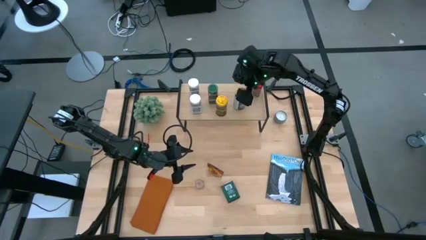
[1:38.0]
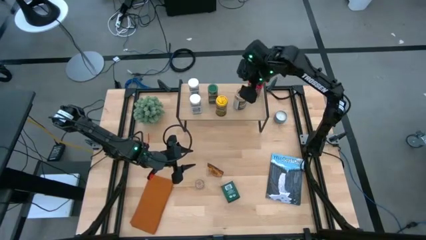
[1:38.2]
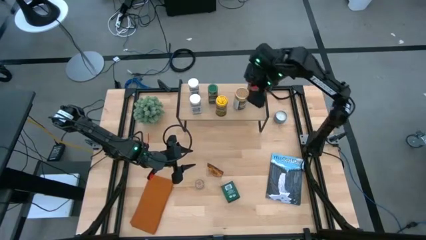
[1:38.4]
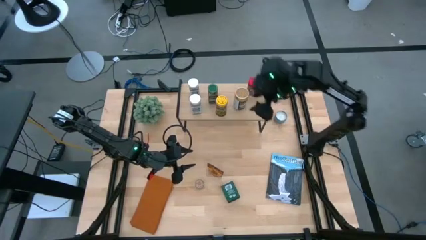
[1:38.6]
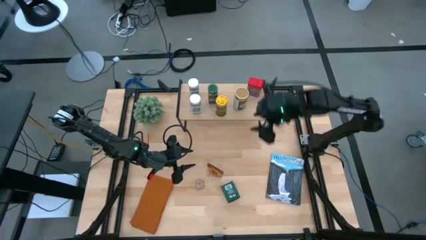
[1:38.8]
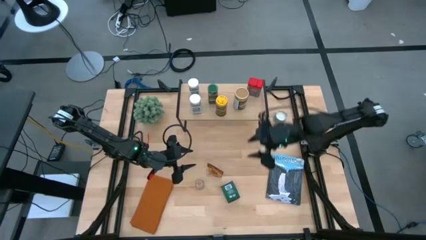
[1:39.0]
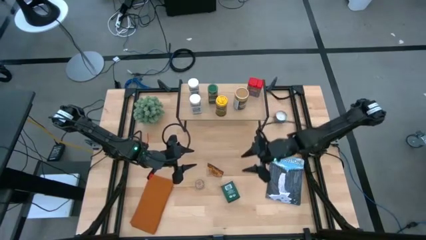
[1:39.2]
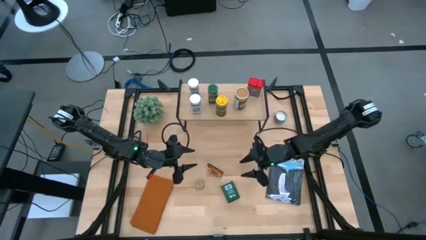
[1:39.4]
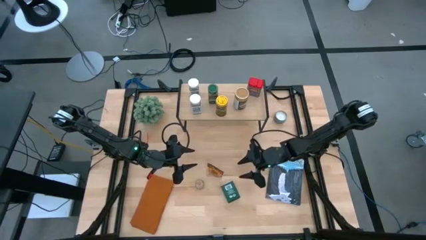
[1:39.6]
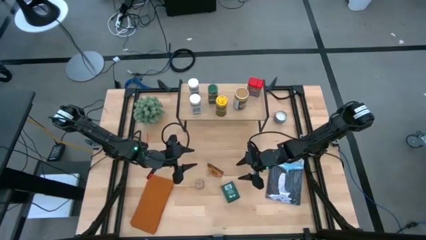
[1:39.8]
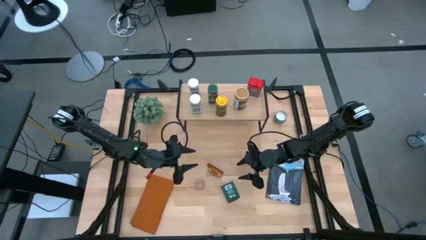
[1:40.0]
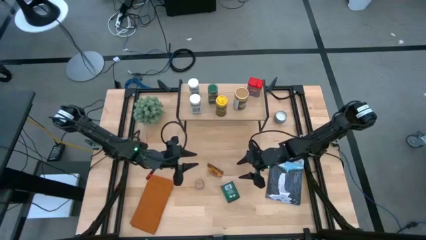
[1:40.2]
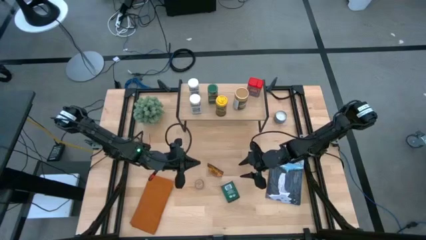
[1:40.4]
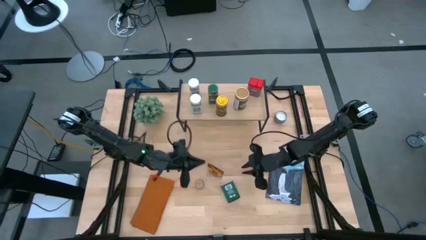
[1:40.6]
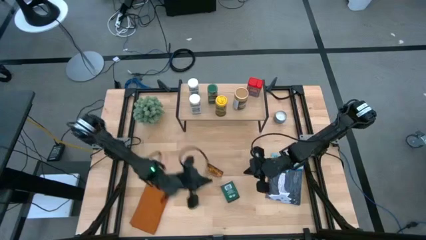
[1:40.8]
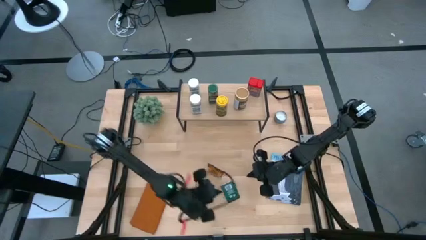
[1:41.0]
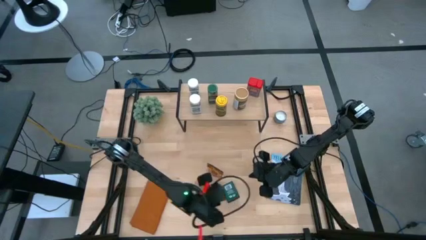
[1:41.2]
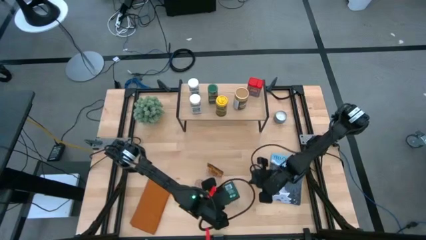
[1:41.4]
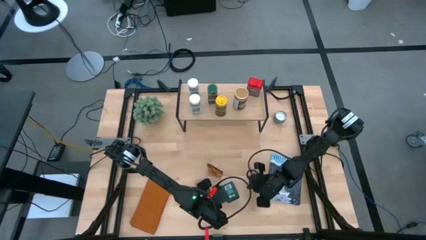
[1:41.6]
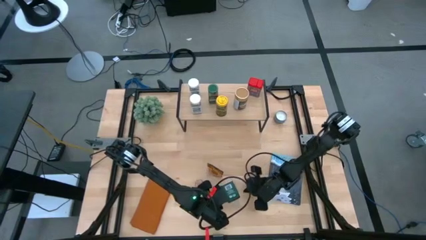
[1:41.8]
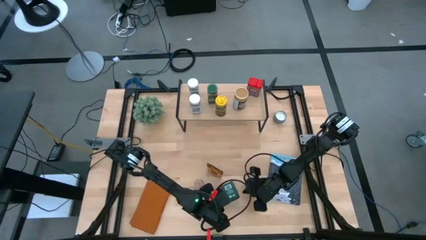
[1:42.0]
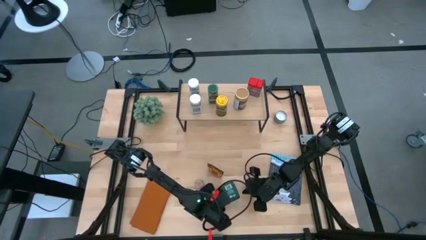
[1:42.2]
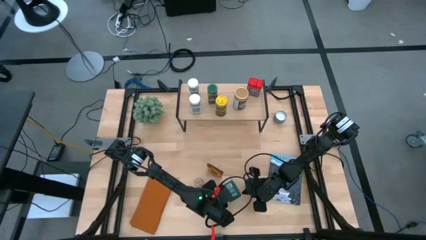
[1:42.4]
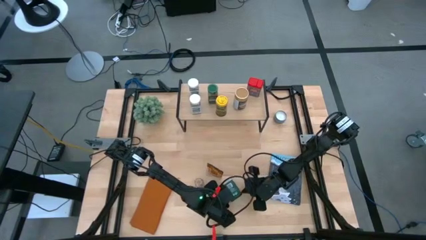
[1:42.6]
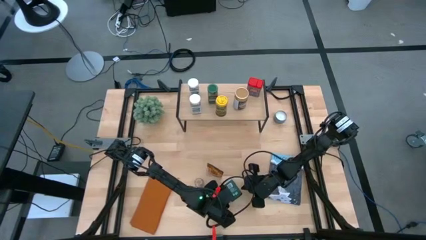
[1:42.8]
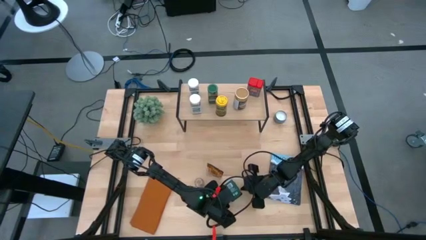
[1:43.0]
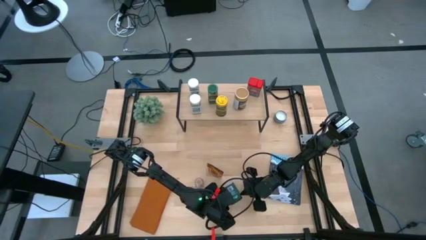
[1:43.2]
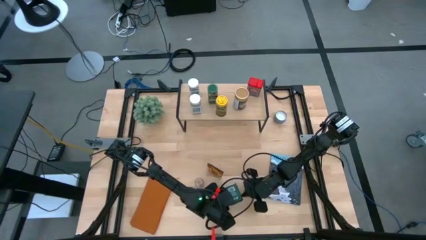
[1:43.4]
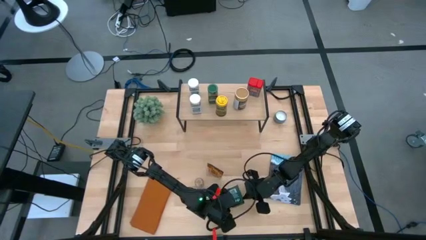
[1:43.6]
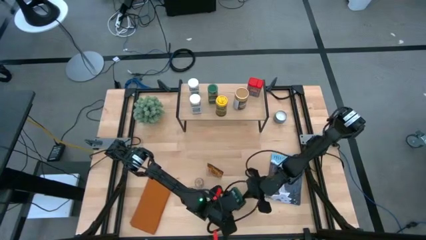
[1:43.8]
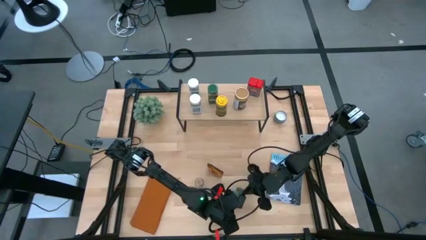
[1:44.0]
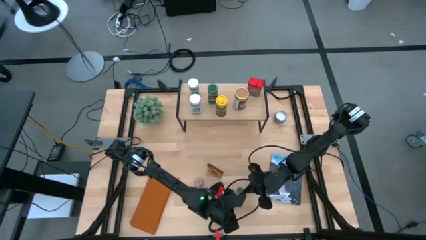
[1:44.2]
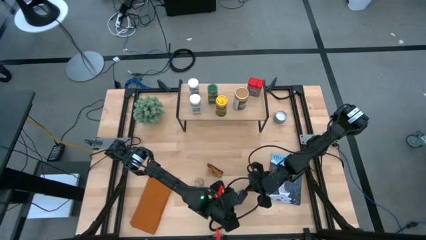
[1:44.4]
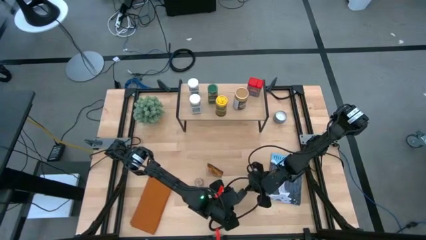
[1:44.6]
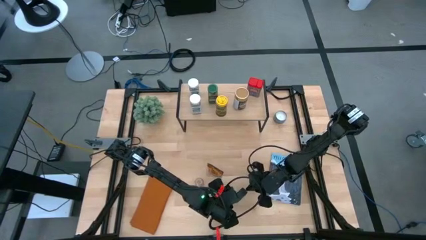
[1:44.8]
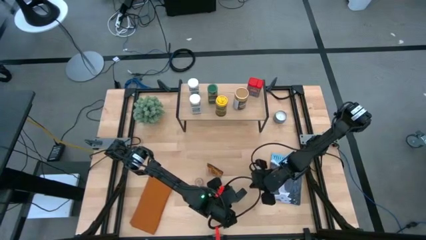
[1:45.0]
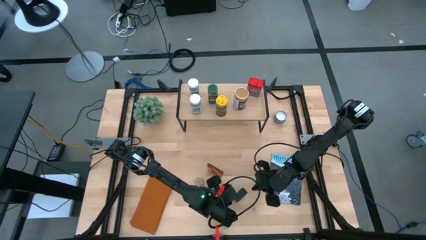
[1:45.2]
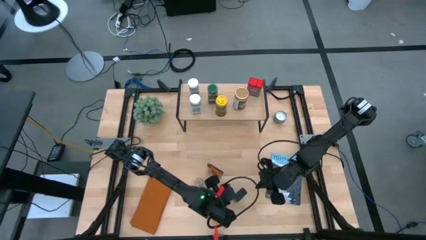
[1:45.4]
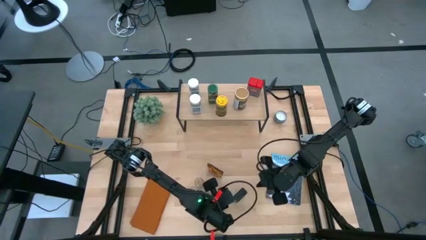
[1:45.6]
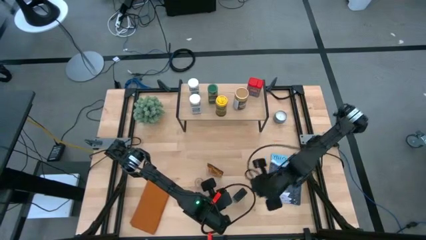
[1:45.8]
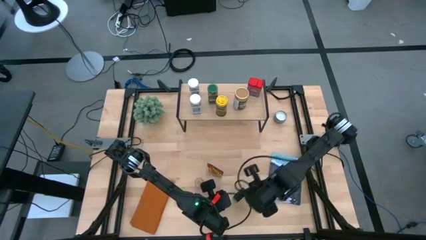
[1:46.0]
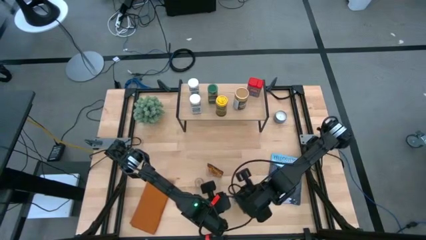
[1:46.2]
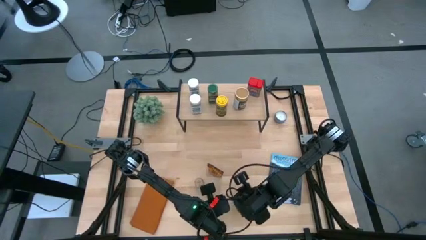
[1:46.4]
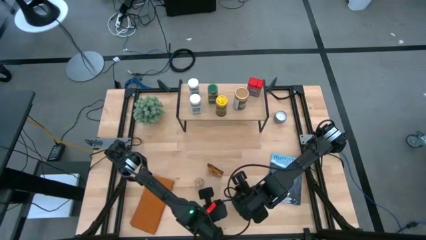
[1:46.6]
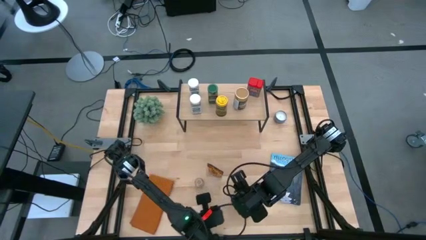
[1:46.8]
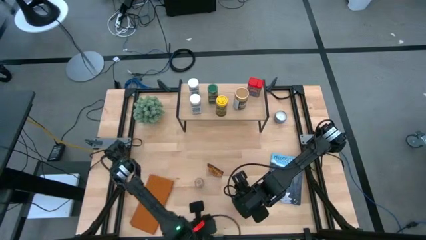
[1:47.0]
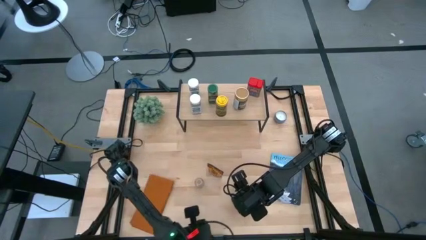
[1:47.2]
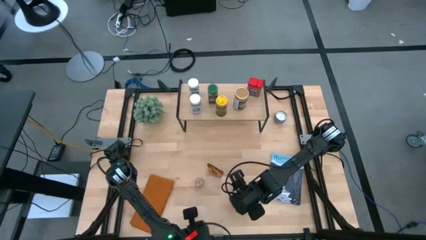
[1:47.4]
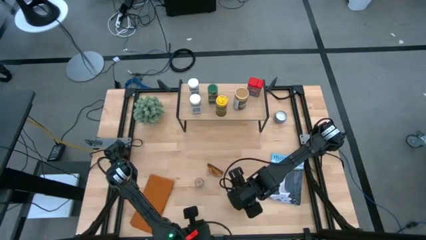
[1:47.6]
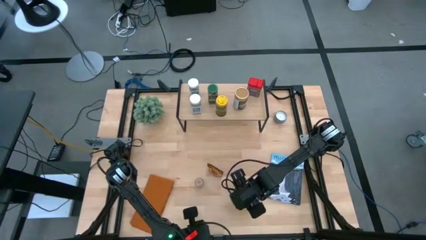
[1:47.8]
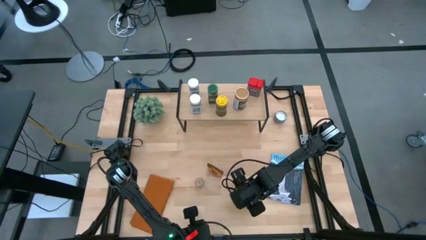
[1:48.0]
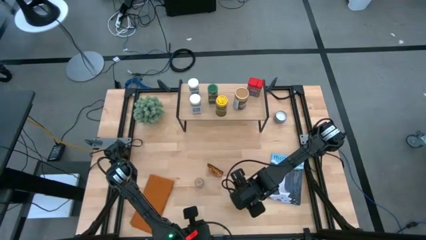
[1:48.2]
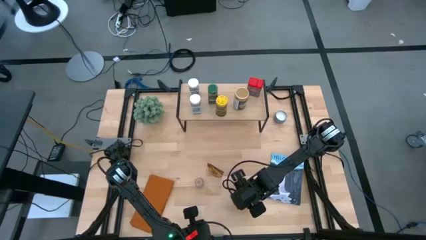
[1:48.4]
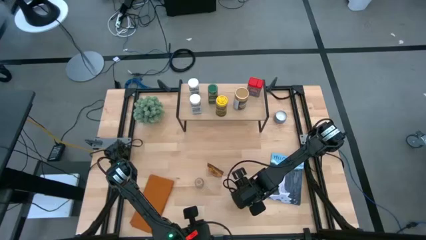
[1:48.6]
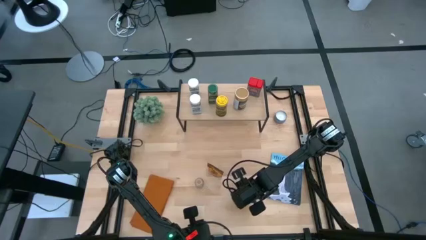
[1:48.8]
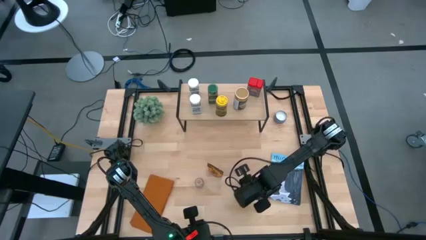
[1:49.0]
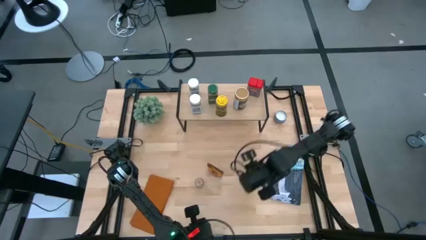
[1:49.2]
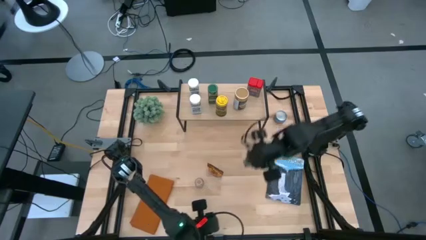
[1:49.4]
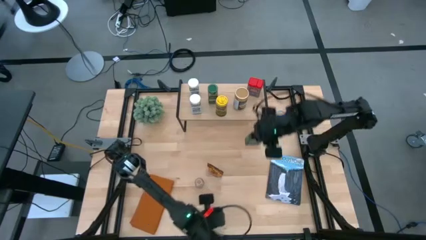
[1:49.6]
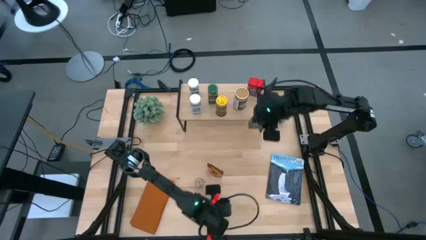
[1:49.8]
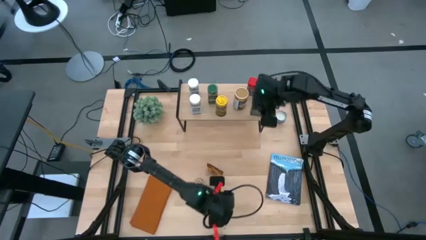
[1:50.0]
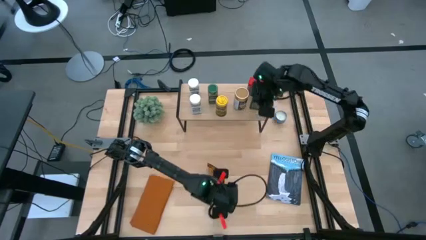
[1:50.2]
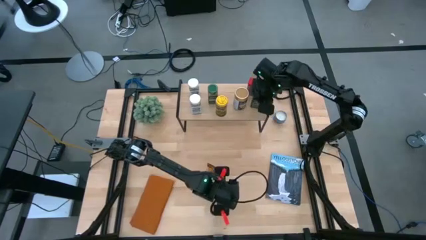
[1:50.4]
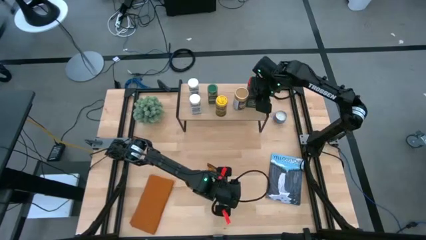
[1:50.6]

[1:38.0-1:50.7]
Task: Shelf spices
Put the black seasoning can on the shelf
